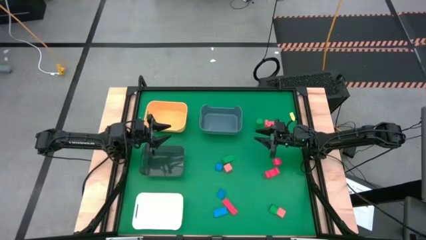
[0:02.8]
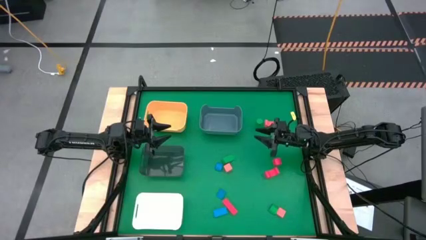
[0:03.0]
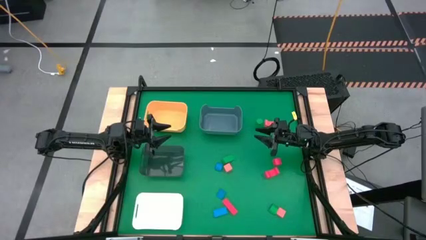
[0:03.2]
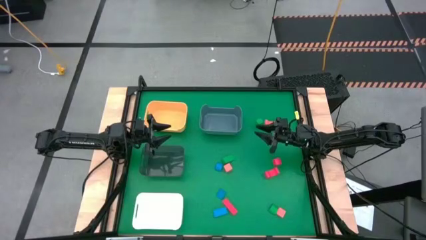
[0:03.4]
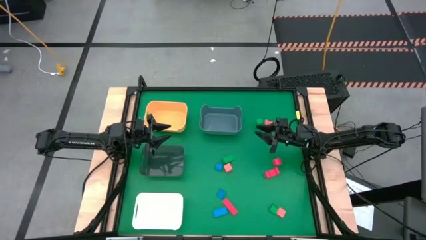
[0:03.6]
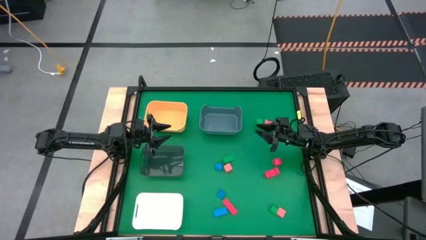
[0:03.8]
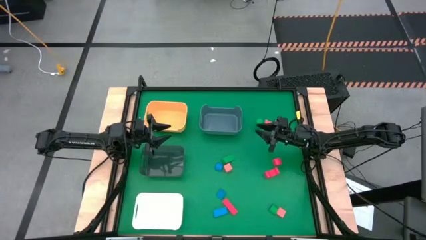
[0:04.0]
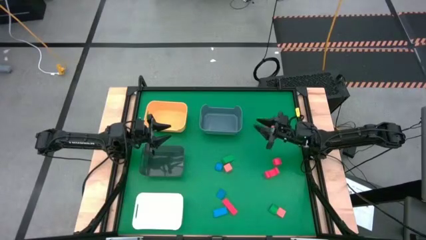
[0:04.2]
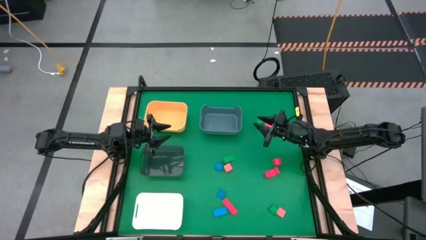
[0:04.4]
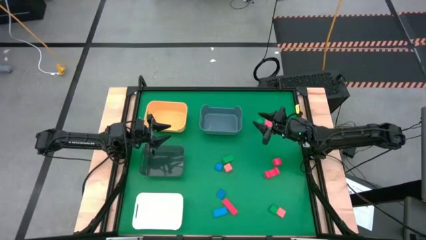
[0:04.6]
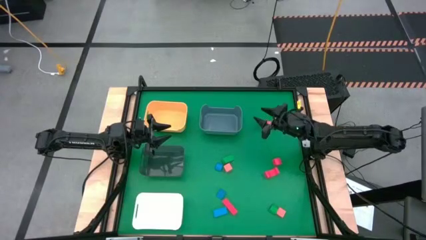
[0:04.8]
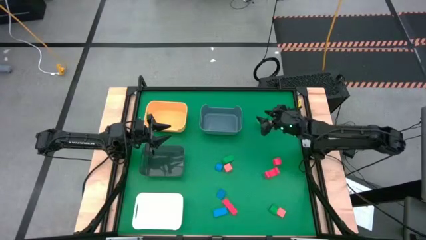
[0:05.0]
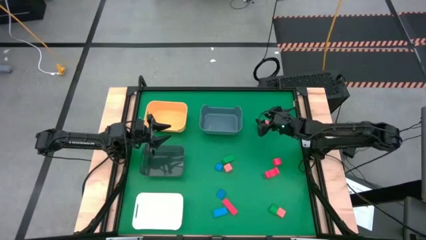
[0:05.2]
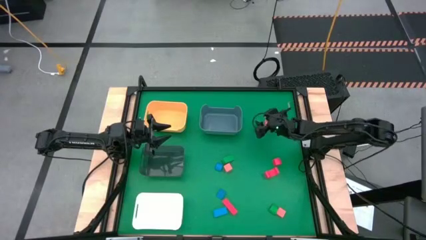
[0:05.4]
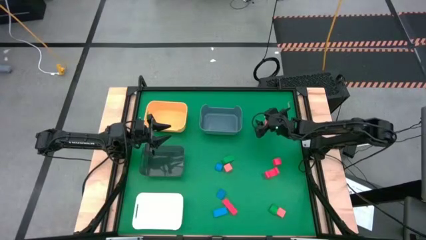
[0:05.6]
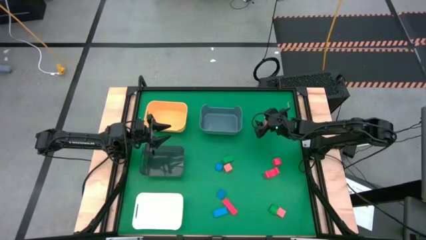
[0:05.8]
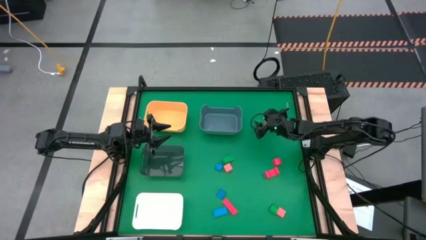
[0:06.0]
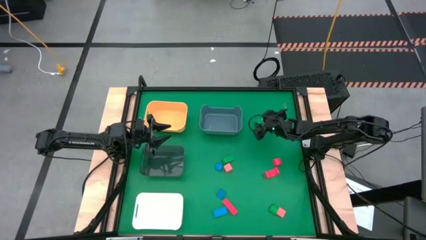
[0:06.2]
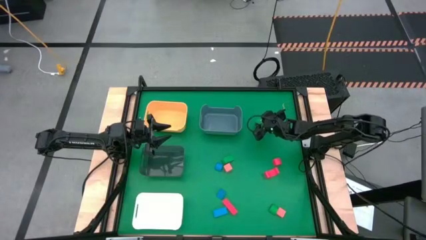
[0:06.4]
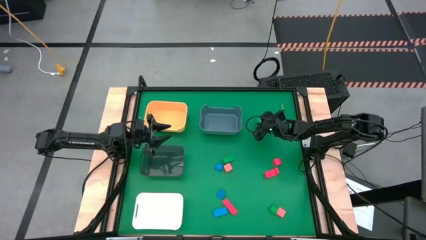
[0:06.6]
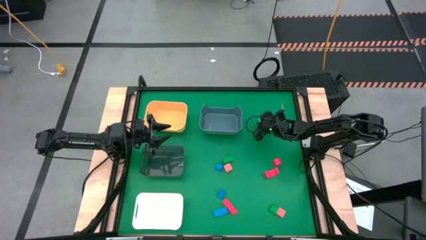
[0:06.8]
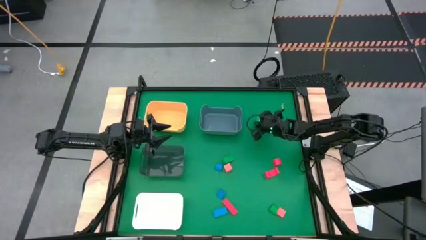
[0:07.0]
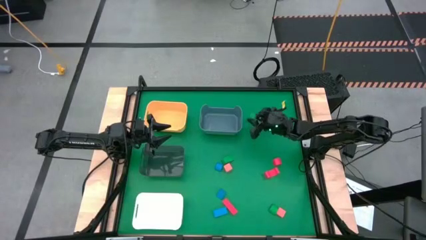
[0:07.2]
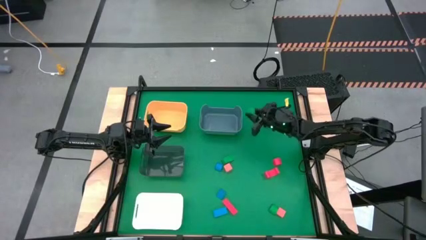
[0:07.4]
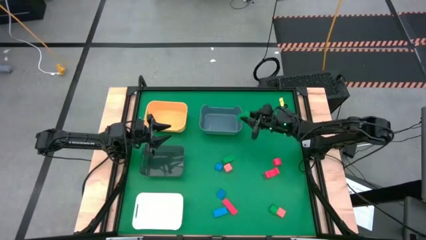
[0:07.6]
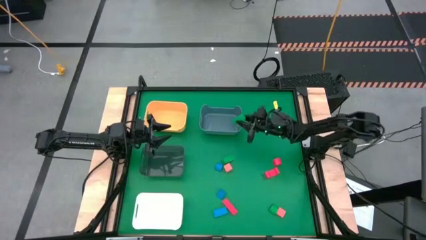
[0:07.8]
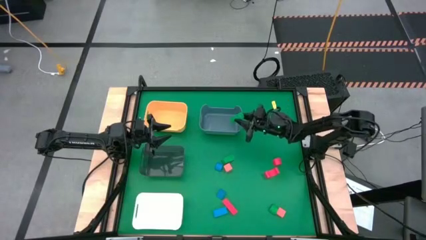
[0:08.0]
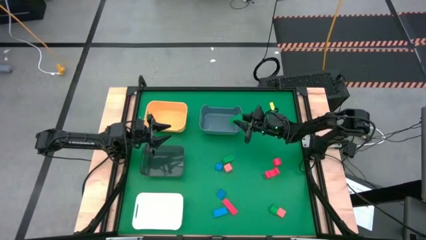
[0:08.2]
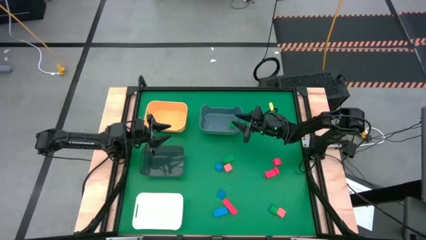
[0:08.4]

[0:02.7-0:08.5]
Task: Sort & place blocks by color
Put the green cylindrical block into the blue bin

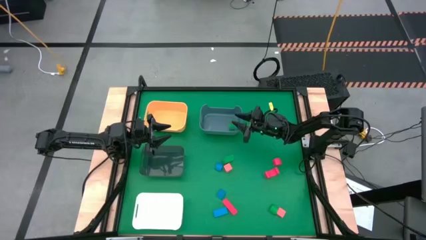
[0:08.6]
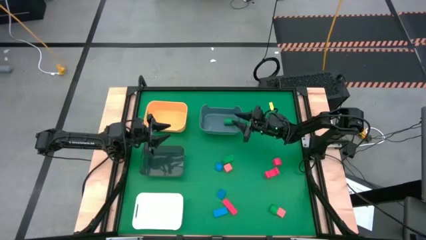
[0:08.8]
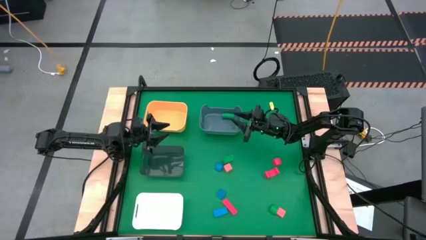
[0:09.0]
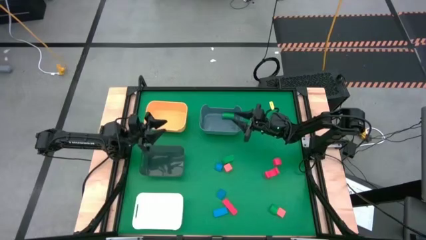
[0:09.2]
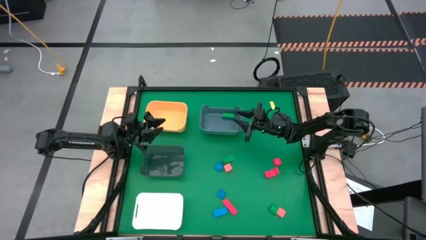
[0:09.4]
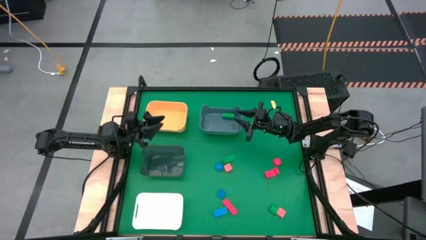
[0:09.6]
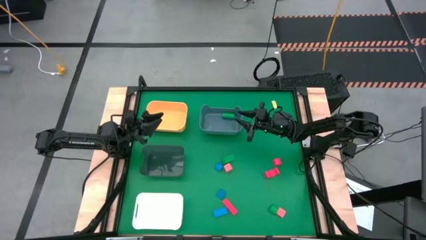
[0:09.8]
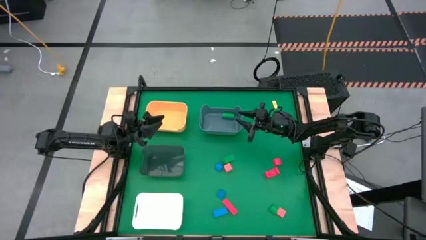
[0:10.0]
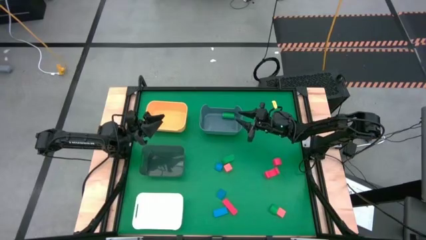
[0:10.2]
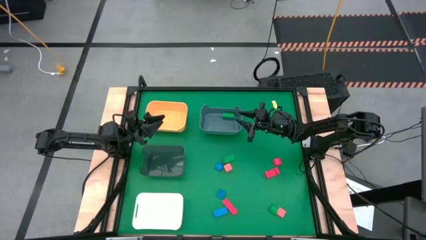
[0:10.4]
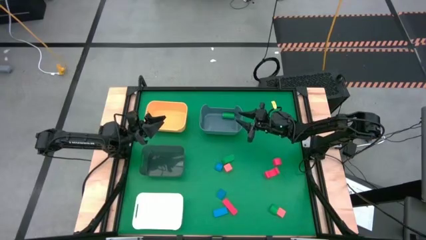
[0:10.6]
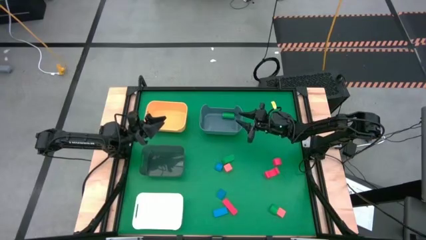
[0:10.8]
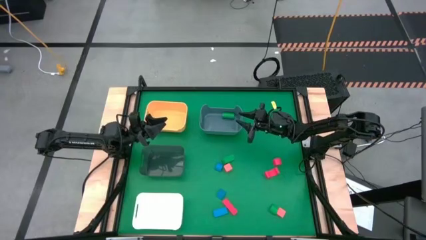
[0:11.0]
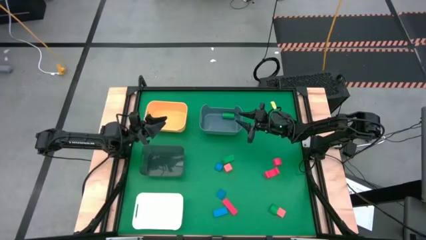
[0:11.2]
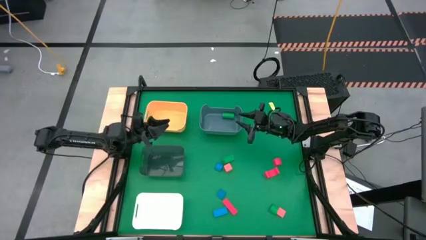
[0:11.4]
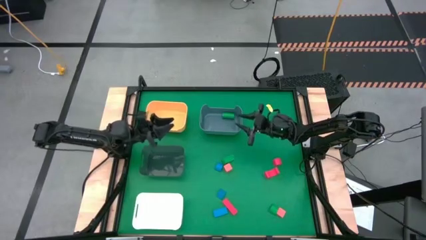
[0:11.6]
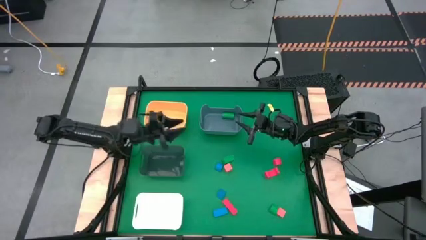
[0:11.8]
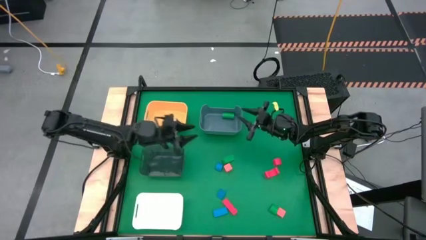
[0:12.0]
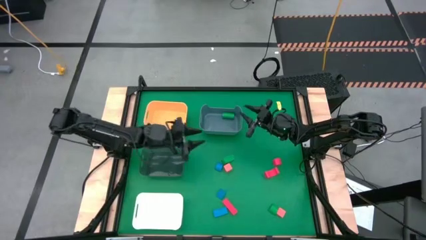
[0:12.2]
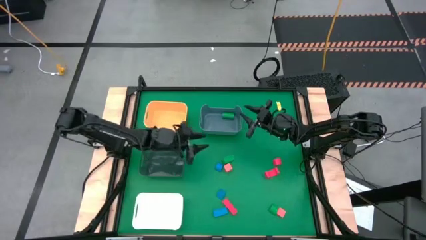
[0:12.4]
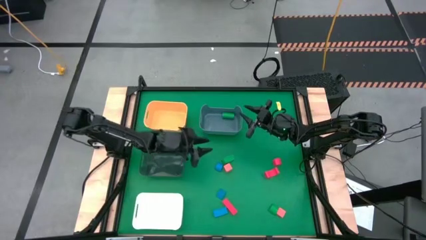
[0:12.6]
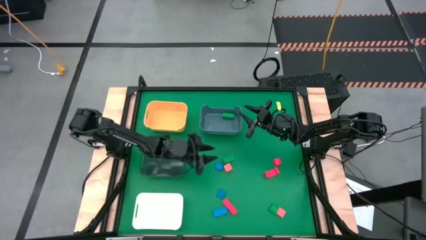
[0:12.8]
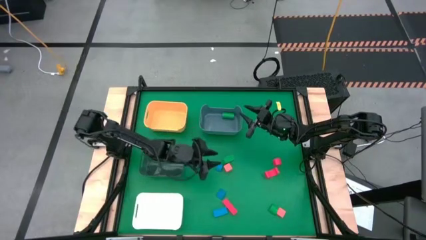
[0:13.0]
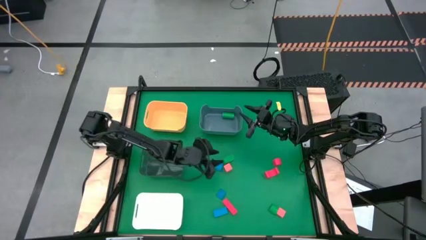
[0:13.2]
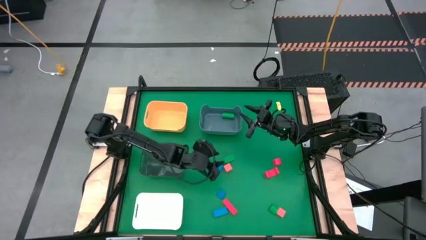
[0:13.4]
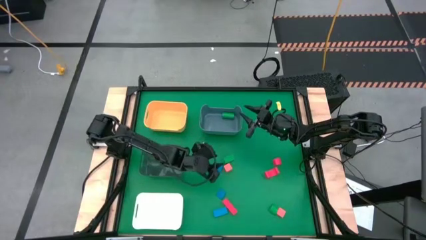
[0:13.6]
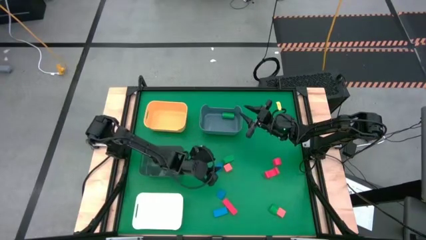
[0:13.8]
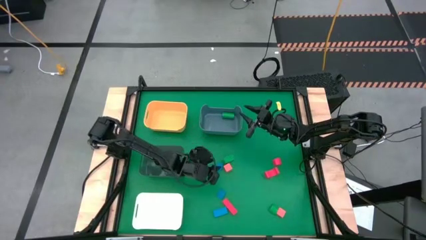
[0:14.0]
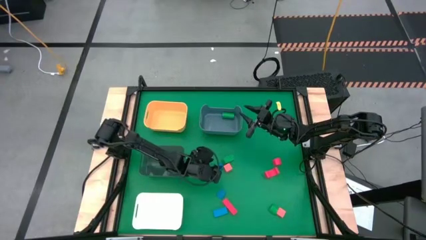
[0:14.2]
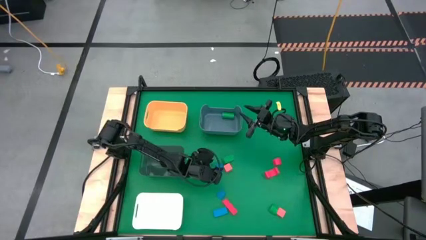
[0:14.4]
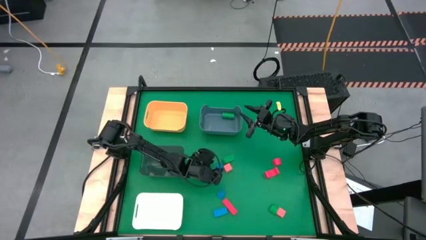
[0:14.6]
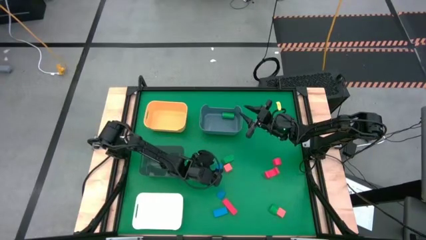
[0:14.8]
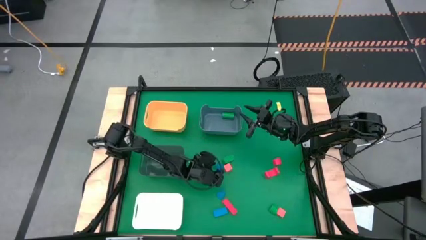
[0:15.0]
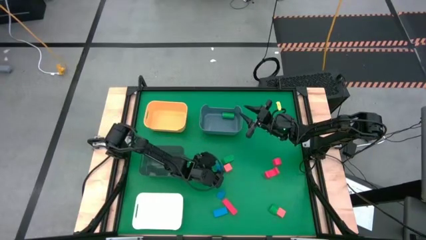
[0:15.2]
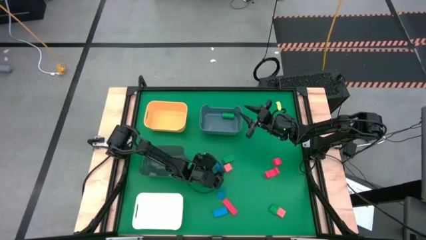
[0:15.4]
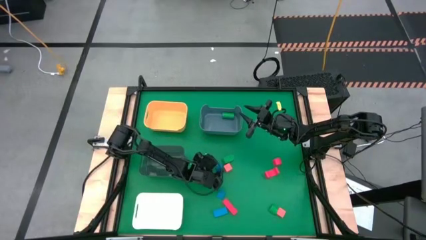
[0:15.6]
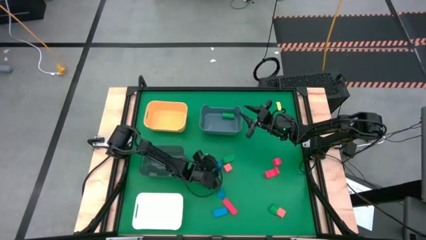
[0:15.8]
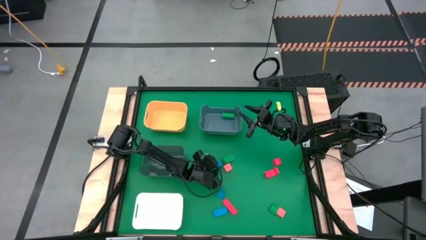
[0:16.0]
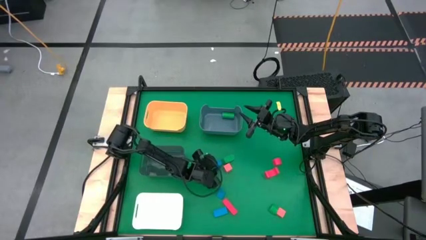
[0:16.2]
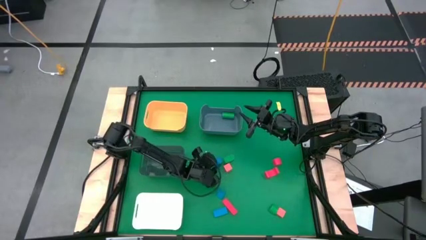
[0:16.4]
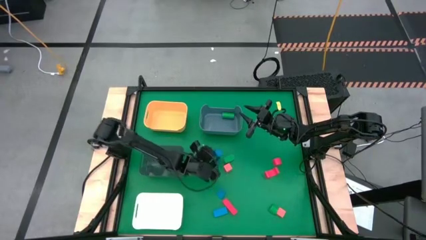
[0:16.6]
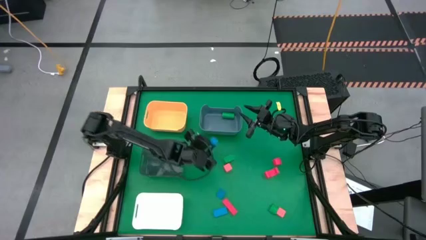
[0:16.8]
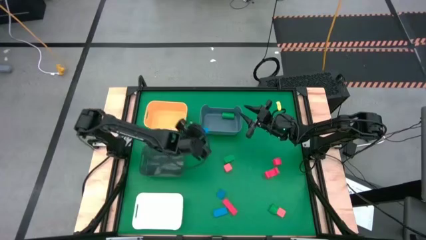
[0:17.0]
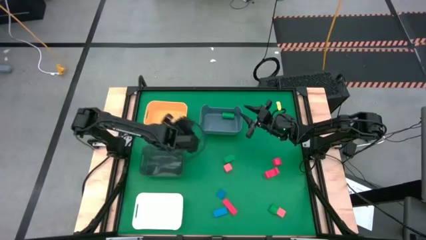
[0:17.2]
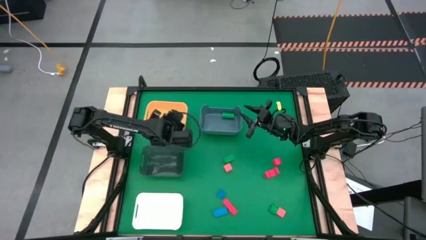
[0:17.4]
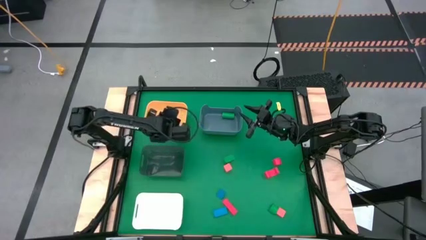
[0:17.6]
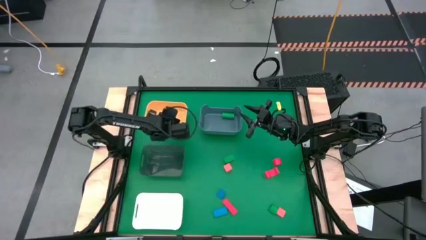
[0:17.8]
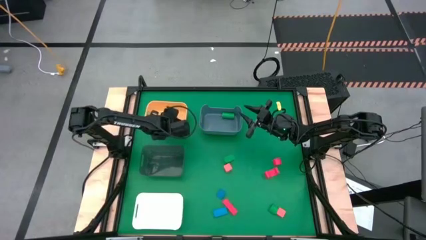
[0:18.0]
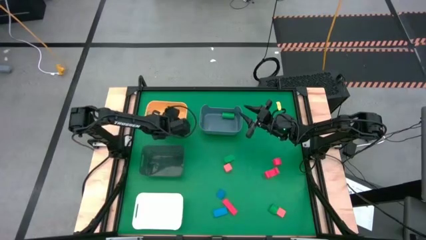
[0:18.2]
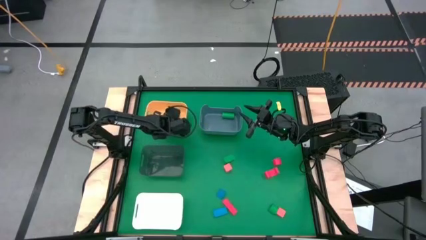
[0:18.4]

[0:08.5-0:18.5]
Put the blue half circle block into the yellow bin
